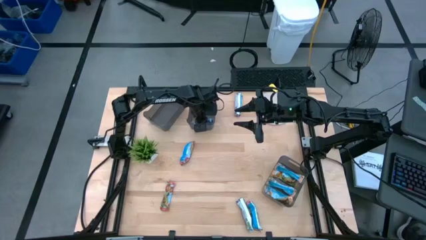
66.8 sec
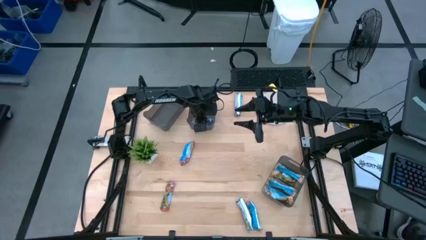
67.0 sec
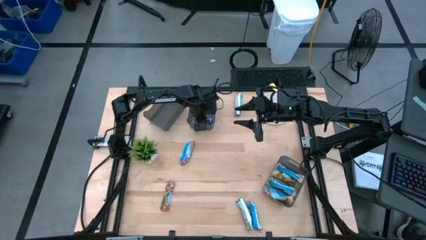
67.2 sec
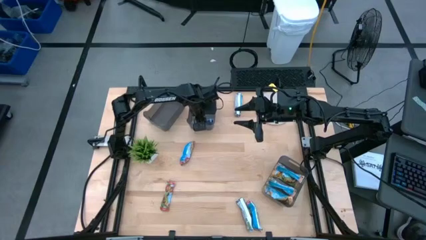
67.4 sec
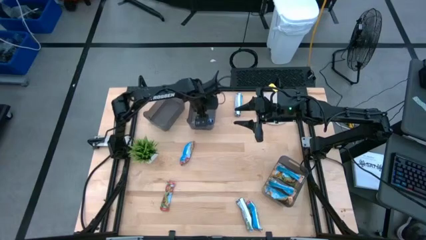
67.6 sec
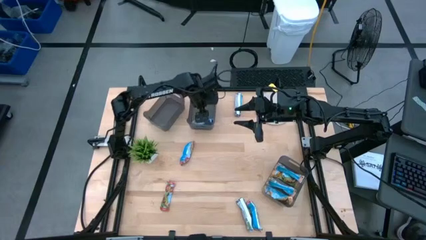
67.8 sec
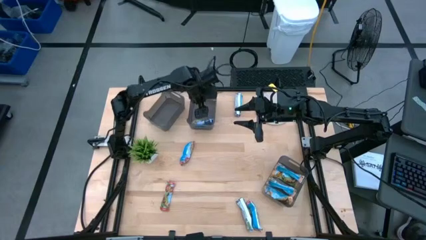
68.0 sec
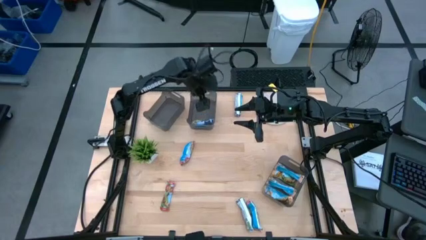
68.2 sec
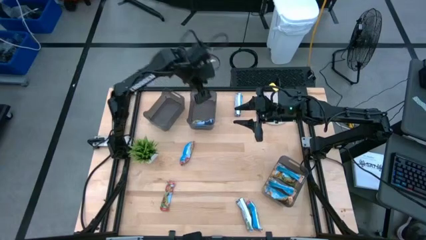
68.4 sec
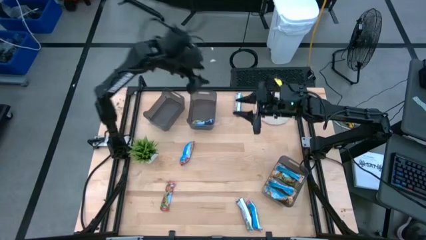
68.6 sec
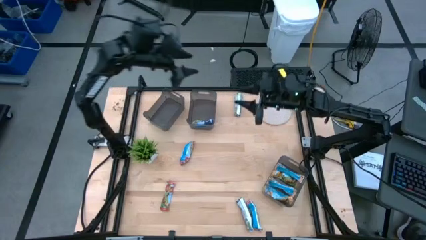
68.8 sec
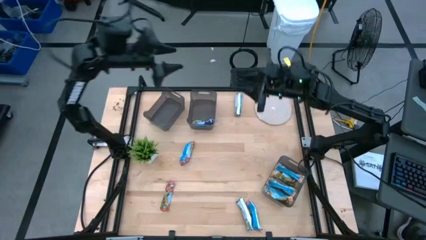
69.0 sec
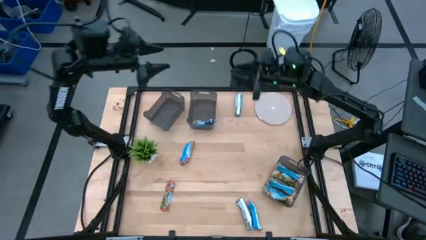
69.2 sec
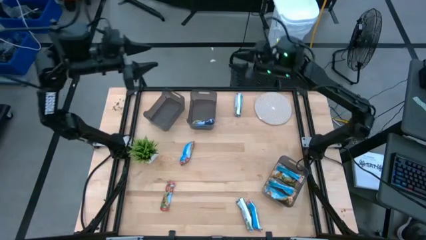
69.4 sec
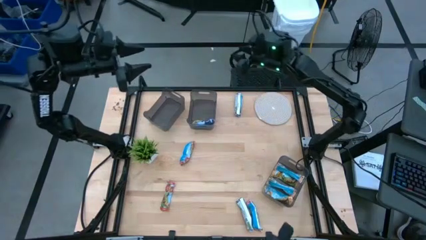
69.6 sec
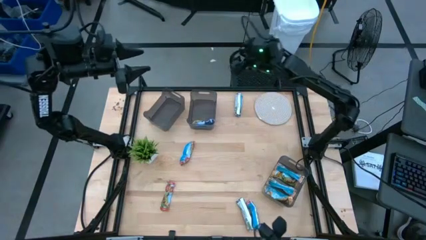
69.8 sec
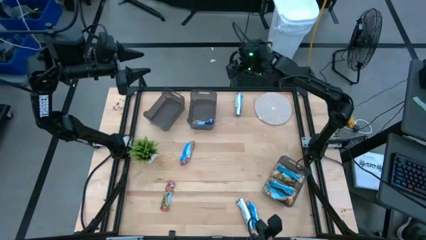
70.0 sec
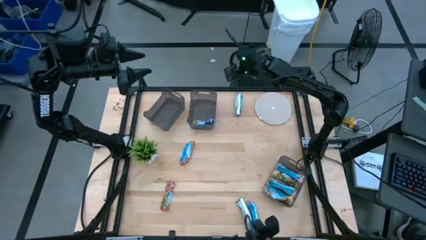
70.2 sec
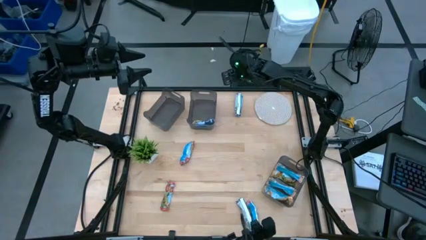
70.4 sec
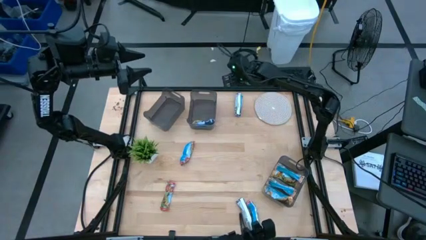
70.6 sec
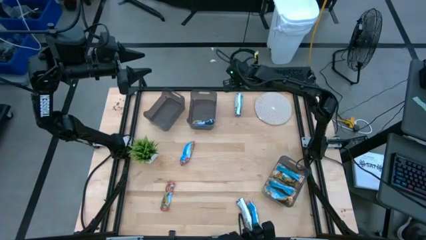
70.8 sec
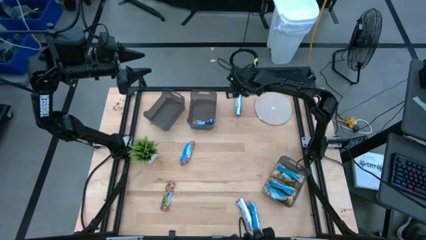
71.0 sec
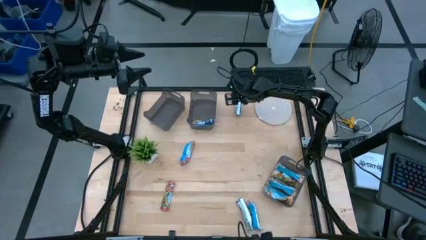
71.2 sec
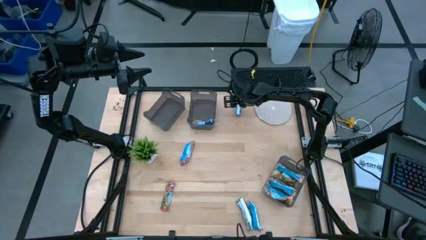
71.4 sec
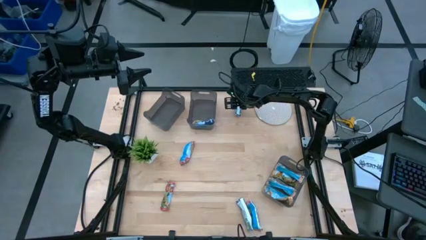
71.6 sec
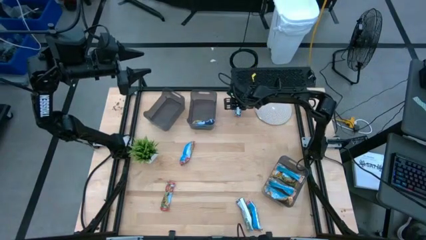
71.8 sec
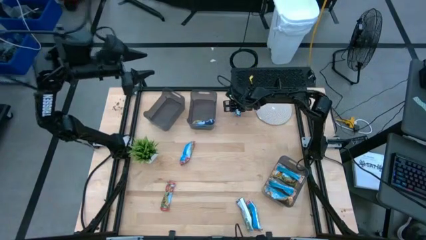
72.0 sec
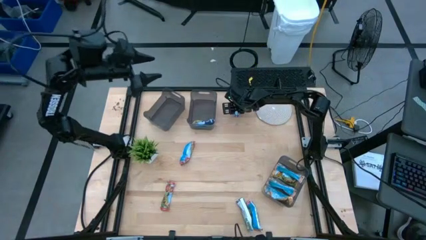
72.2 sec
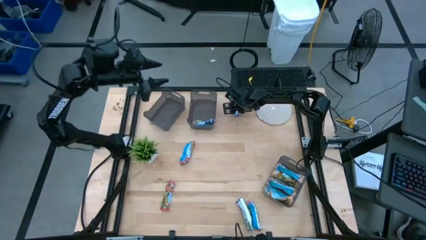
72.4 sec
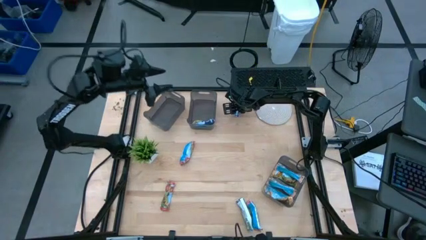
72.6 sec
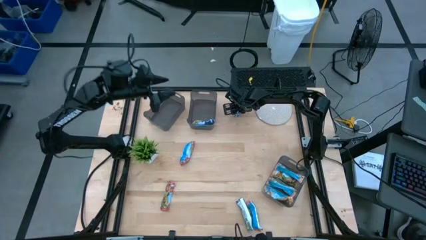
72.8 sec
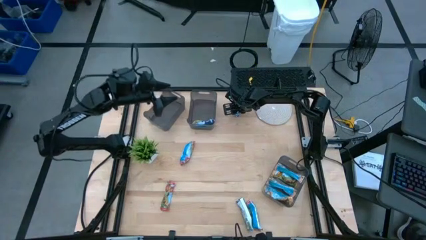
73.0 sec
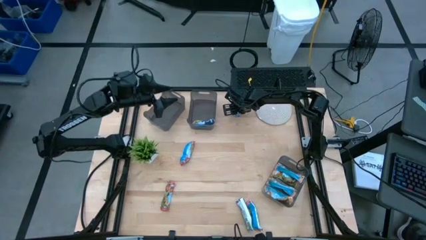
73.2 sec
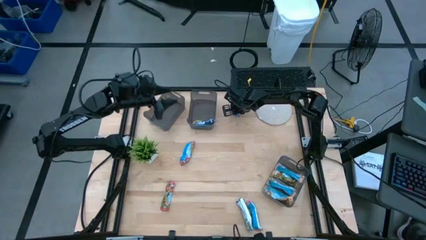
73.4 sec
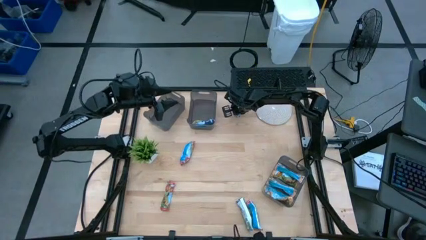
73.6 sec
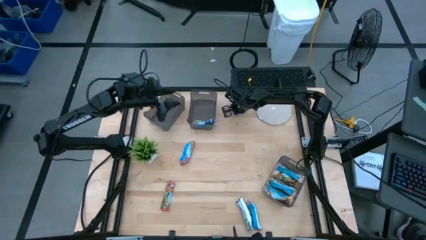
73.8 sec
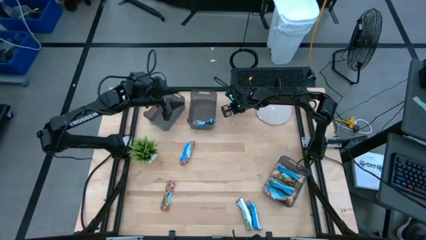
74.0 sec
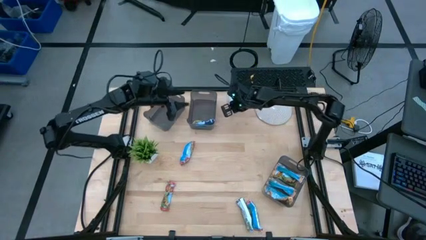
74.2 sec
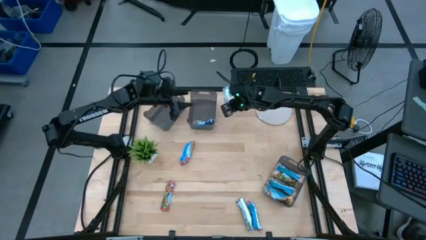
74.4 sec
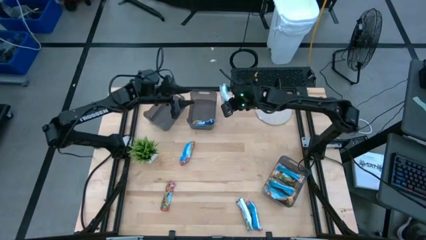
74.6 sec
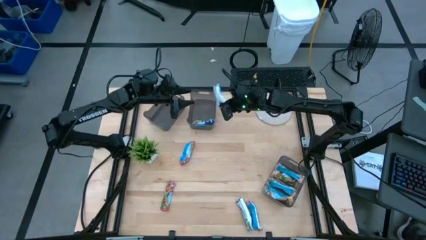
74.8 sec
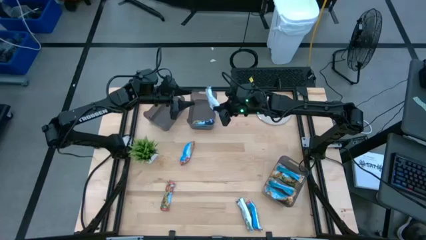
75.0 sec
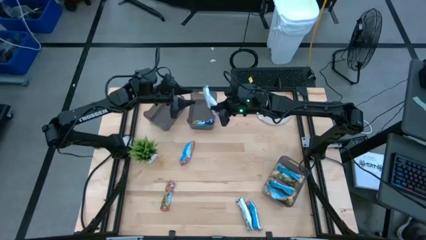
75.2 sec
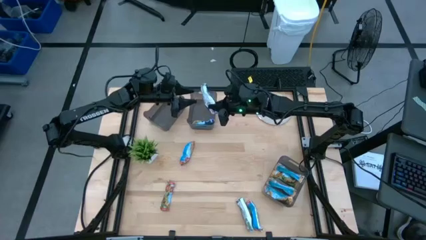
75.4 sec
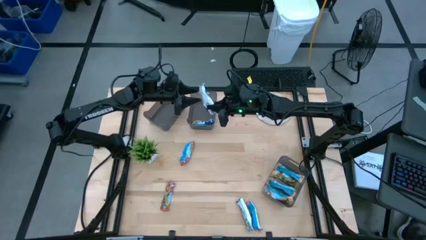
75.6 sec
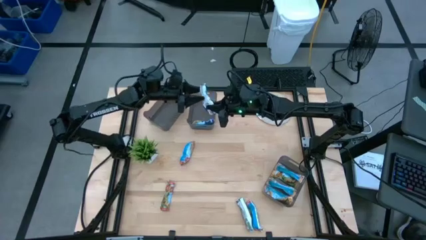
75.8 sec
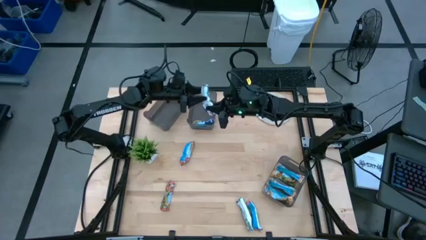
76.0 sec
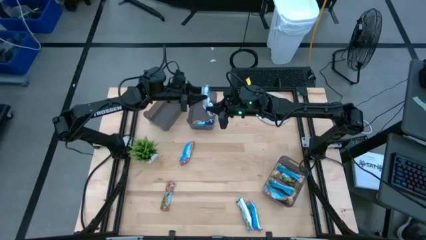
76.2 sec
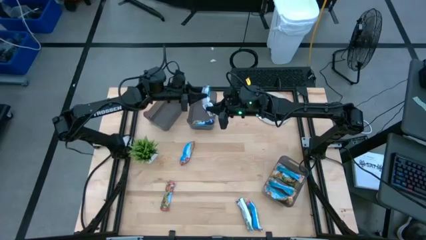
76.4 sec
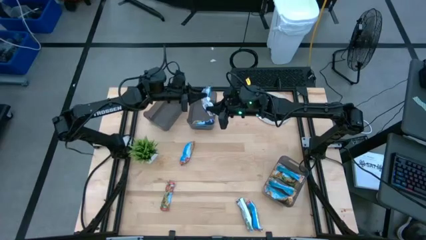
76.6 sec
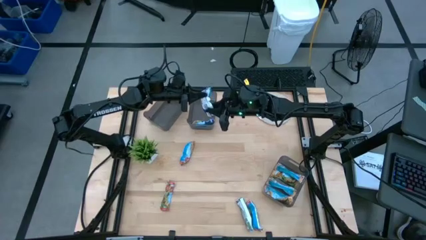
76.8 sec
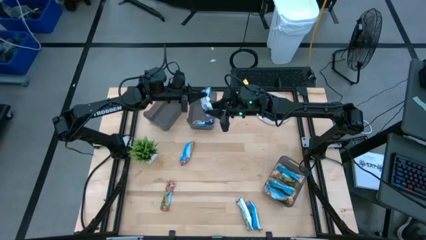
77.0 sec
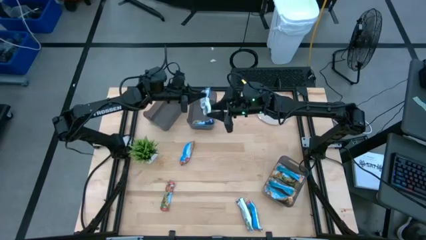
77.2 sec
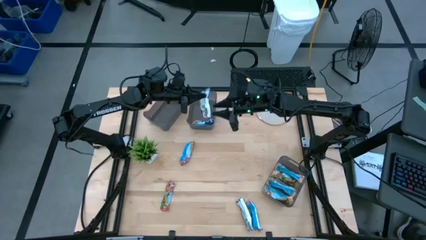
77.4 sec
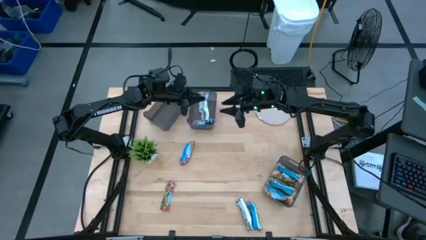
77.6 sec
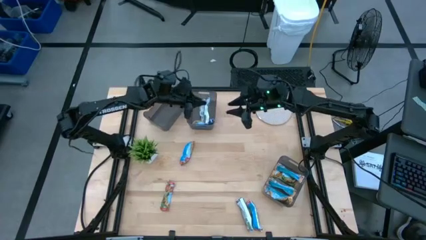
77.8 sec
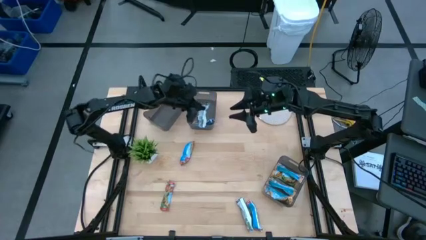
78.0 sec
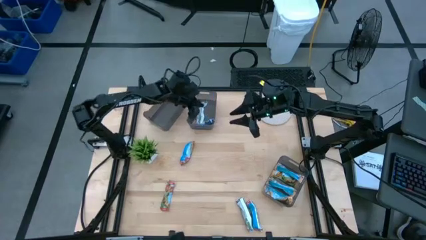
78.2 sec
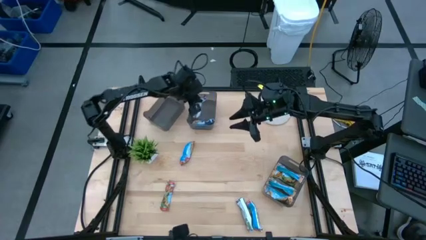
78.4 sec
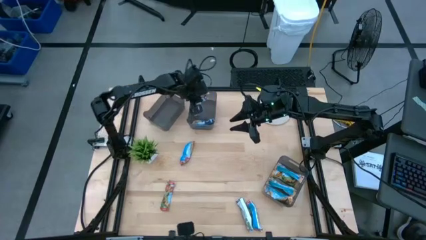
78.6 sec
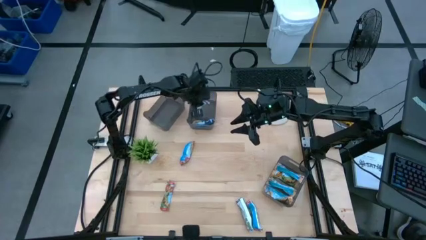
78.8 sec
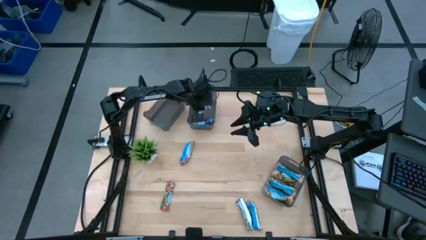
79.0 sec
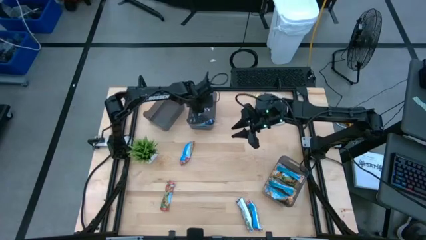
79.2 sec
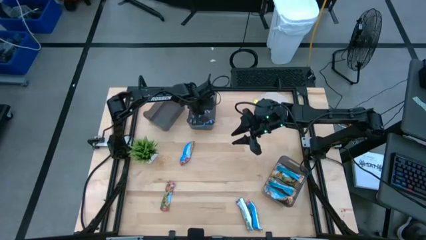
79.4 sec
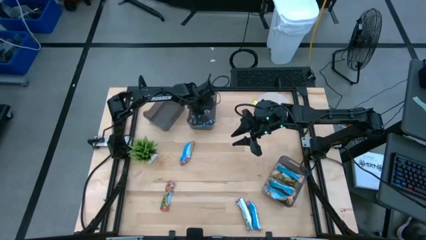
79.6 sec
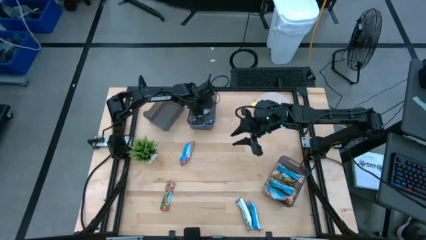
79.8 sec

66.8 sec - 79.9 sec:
Task: Pick and place Granola Bars by type
Put the blue granola bar into the top right black transparent bin
